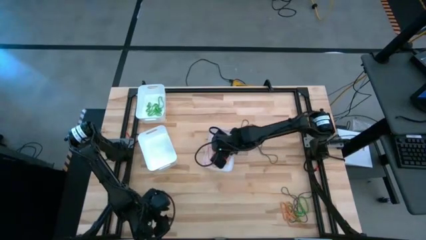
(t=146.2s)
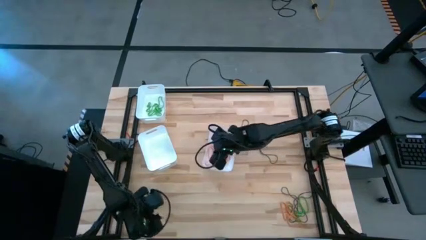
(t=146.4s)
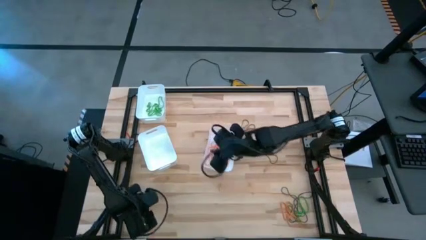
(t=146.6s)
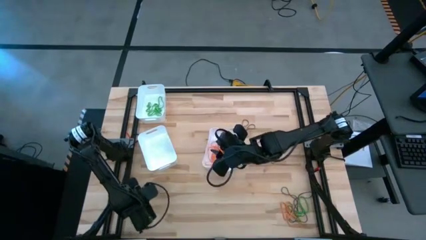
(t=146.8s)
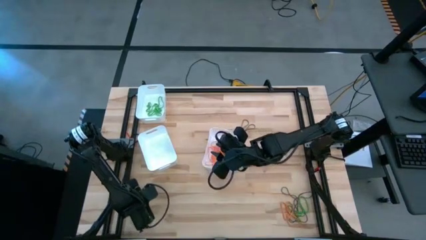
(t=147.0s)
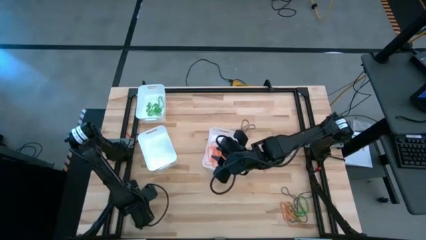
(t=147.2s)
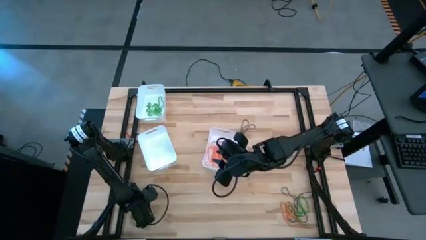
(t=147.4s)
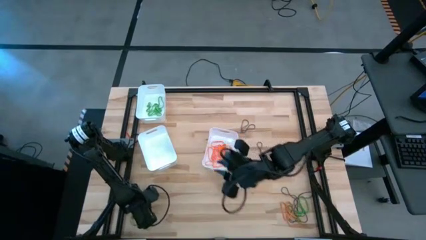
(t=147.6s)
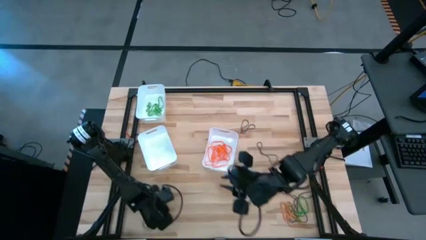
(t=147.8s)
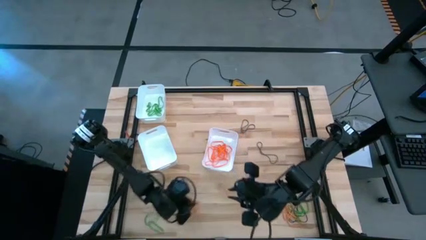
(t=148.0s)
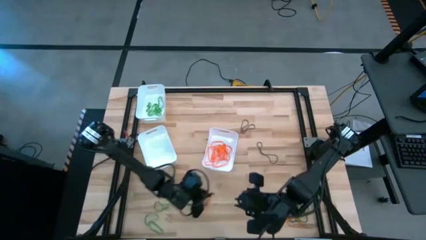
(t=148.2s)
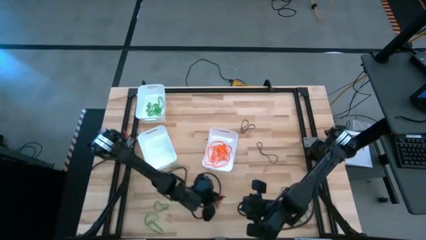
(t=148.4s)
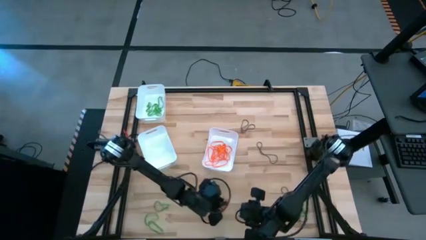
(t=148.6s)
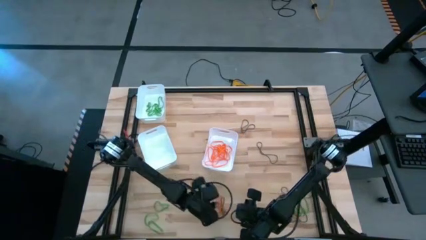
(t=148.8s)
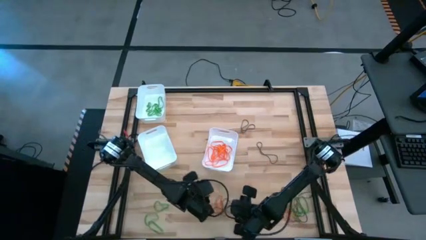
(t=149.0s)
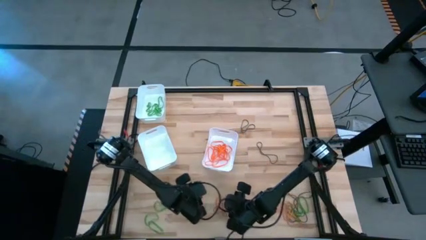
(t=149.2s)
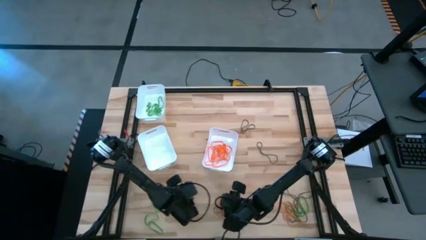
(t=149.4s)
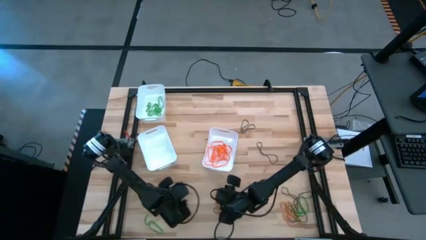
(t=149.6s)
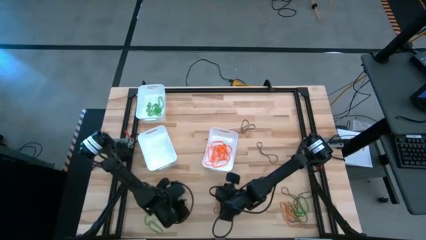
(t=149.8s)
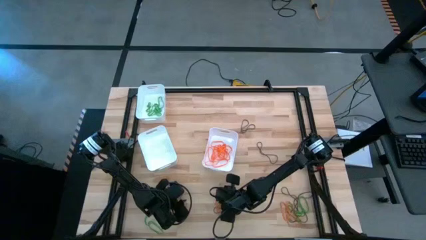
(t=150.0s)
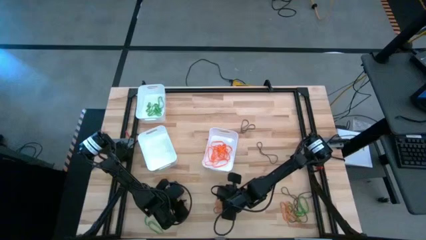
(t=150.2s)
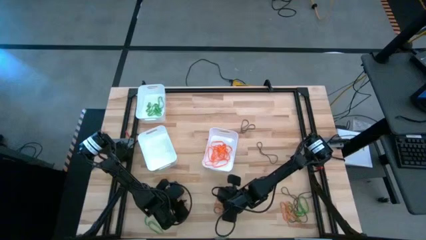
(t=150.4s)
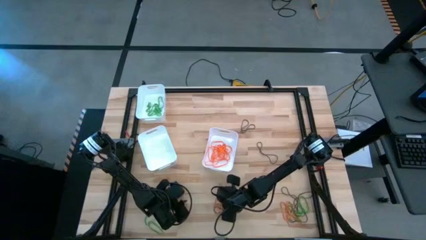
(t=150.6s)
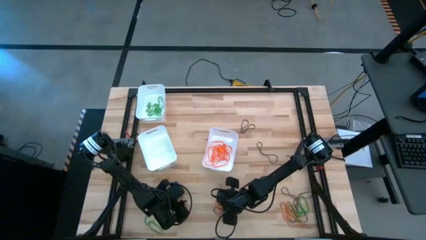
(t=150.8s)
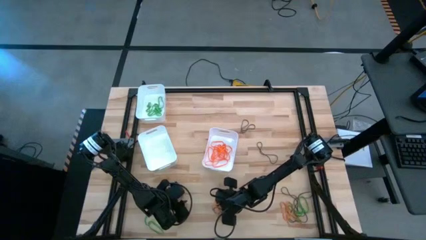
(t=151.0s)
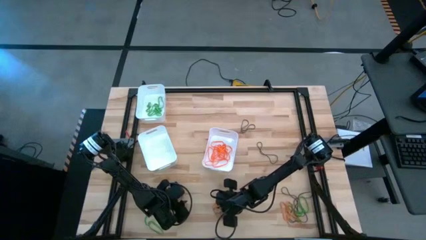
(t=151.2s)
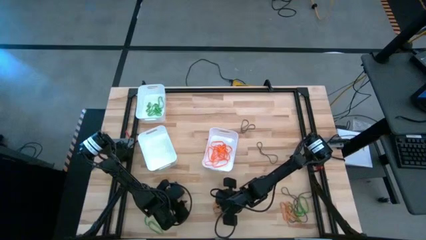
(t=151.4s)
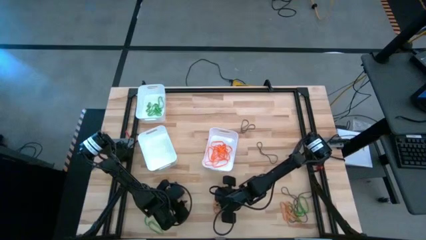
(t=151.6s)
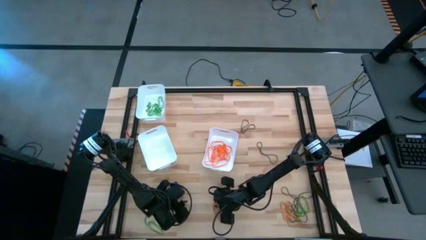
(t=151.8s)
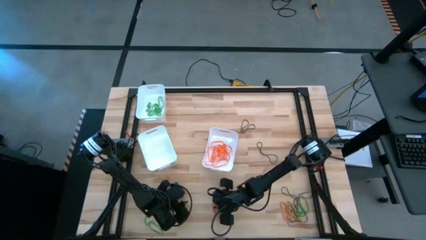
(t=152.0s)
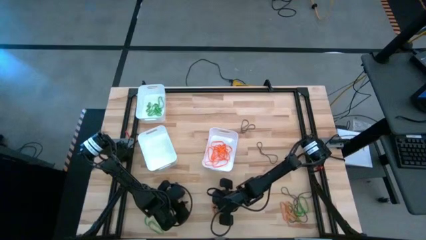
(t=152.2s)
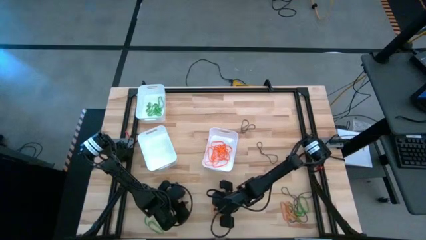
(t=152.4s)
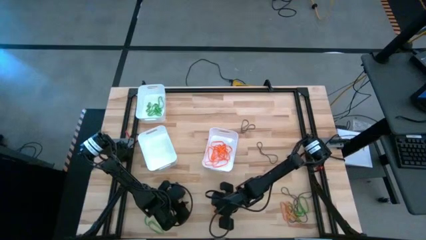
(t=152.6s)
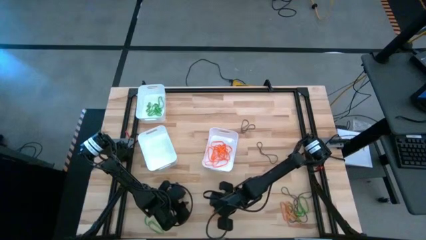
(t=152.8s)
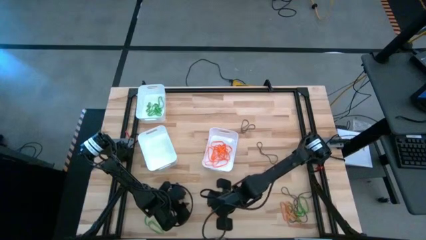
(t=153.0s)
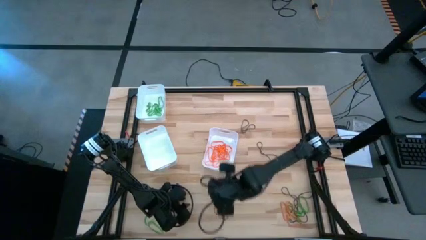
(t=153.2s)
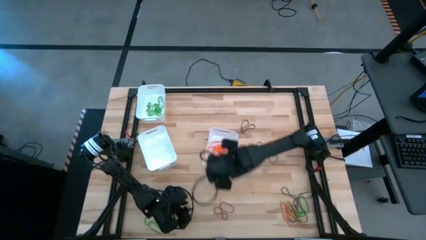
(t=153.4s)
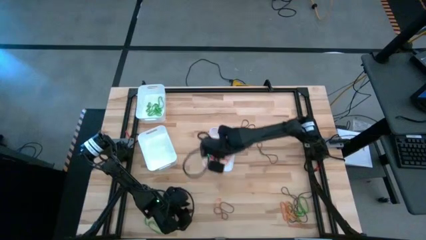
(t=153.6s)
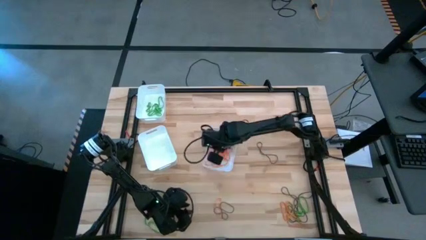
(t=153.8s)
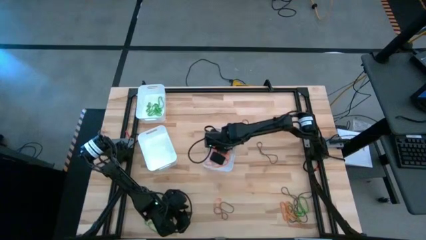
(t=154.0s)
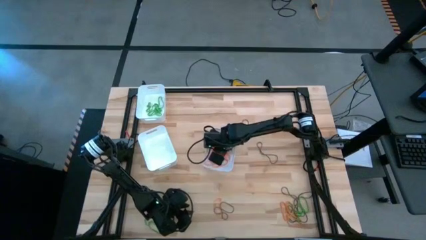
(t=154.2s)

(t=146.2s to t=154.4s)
Task: Sort rubber bands into baskets
Put the orange rubber band into the bottom right white bin

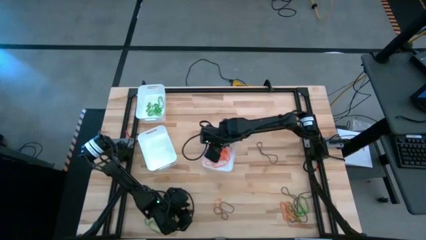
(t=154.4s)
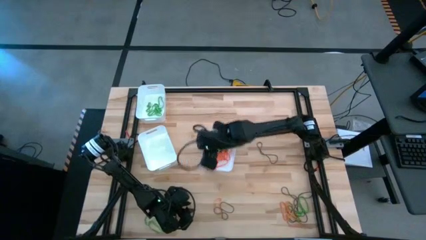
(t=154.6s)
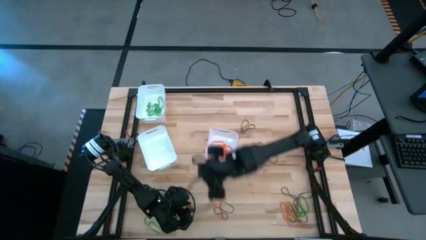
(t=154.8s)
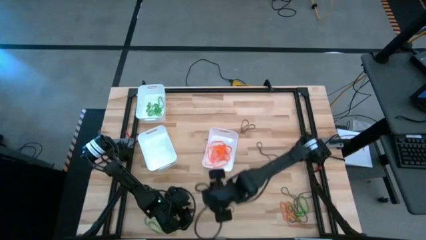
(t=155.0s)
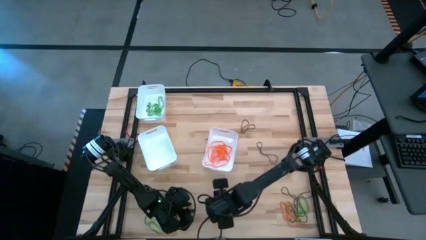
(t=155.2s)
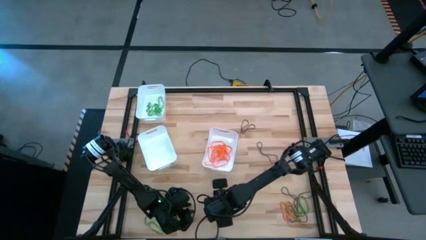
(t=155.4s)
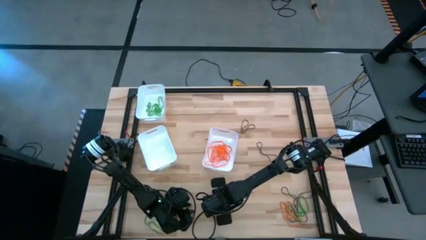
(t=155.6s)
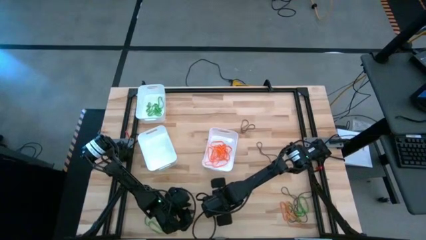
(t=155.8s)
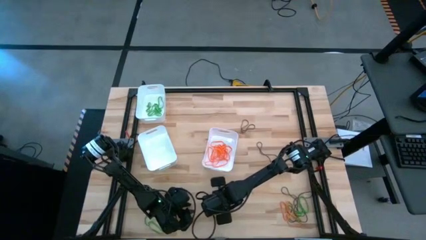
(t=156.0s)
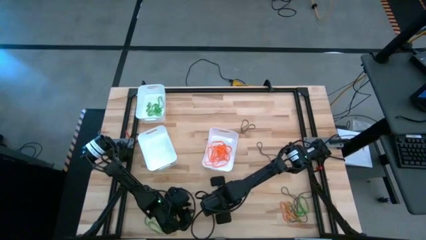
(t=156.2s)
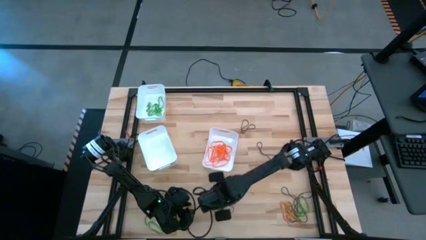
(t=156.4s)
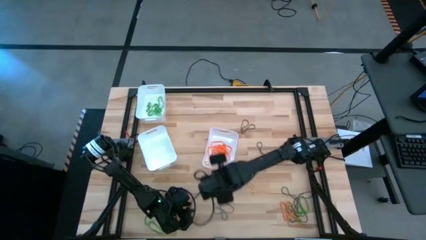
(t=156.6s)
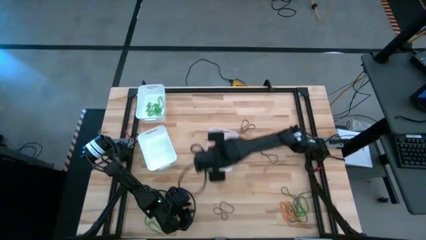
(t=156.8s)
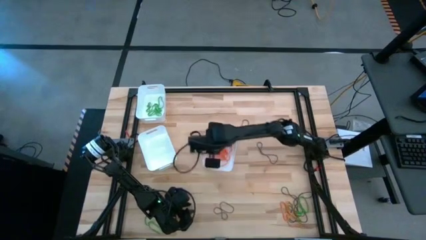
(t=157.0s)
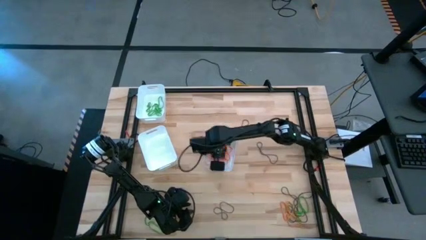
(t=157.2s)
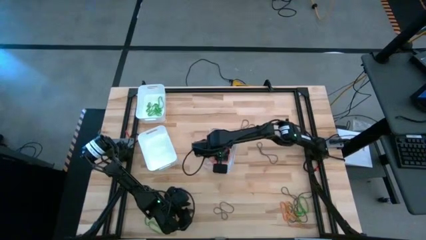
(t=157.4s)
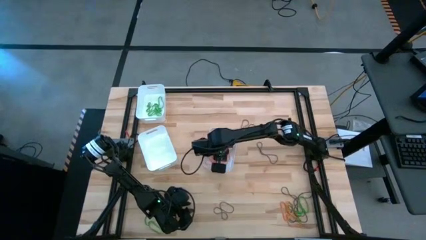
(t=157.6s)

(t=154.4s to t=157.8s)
Put the orange rubber band into the bottom right white bin

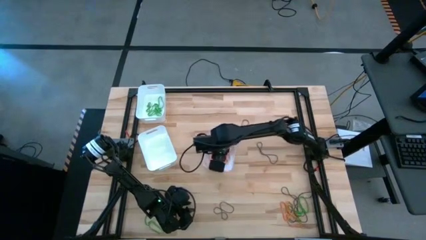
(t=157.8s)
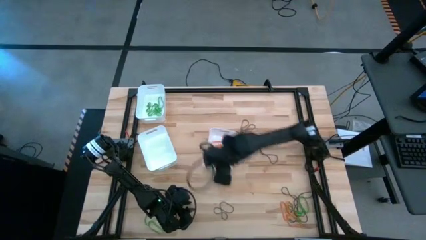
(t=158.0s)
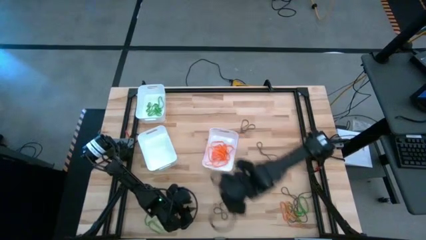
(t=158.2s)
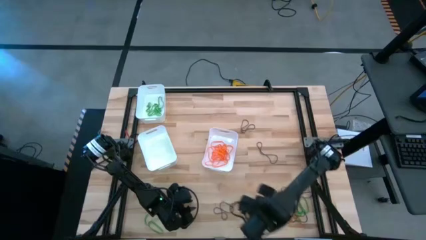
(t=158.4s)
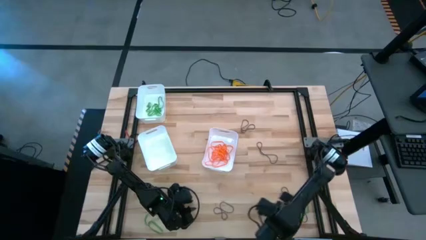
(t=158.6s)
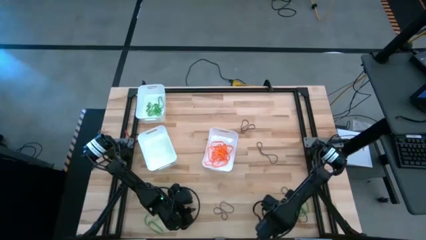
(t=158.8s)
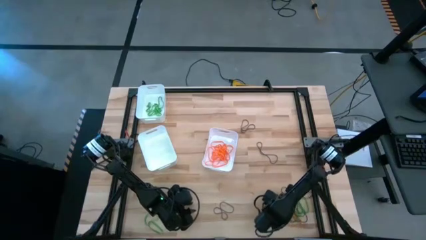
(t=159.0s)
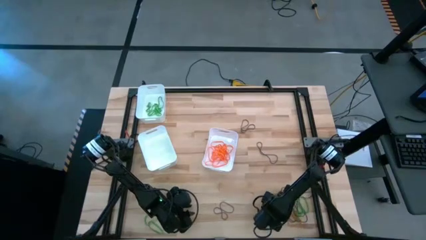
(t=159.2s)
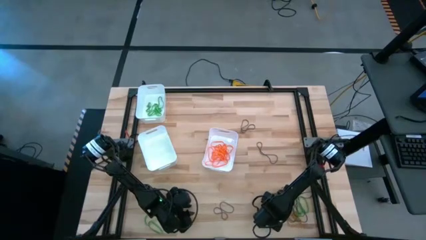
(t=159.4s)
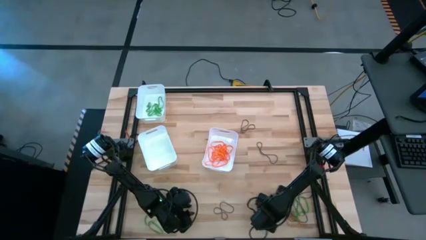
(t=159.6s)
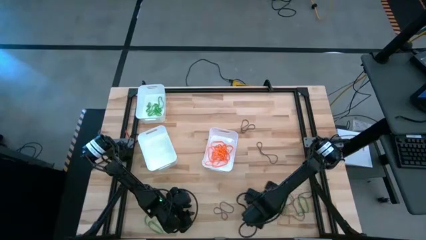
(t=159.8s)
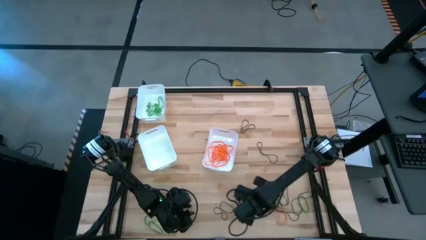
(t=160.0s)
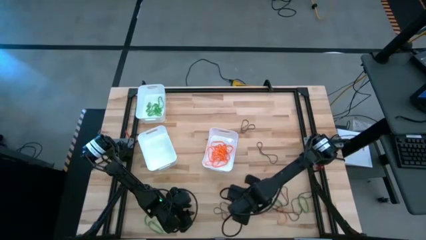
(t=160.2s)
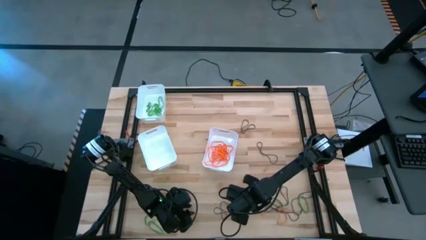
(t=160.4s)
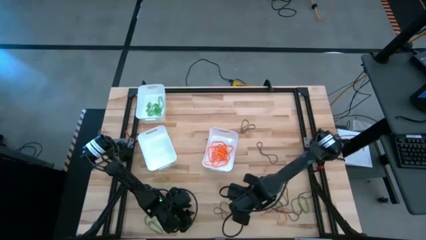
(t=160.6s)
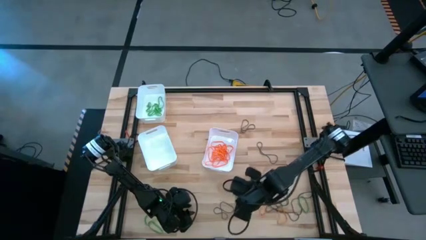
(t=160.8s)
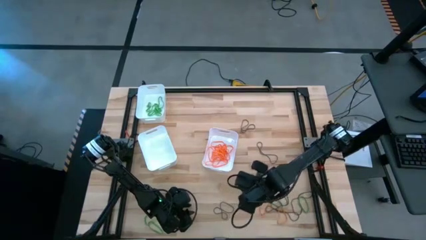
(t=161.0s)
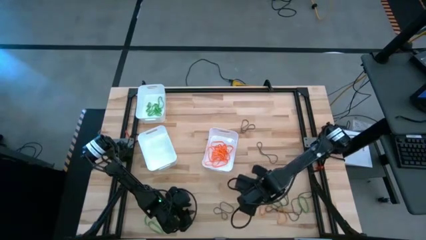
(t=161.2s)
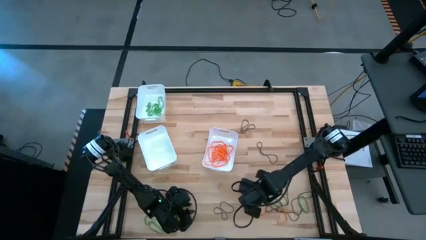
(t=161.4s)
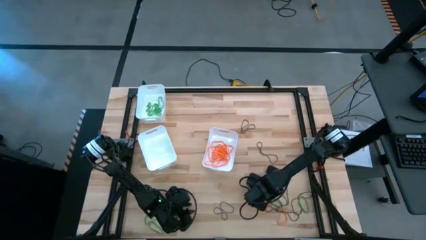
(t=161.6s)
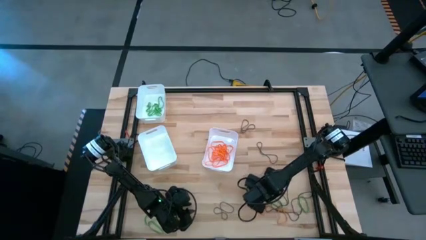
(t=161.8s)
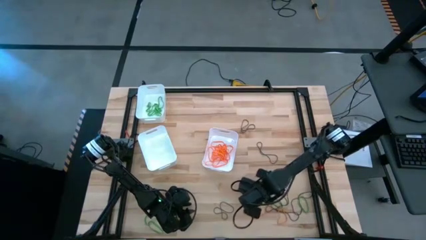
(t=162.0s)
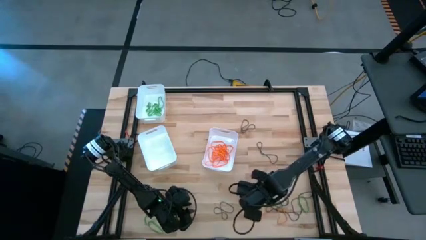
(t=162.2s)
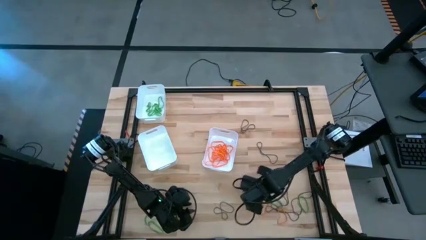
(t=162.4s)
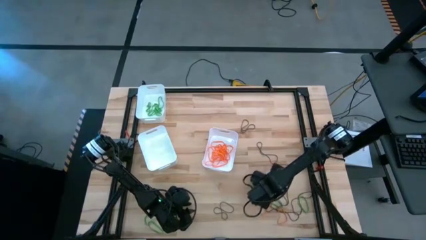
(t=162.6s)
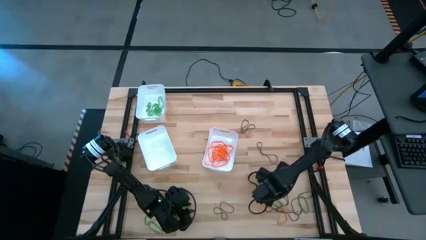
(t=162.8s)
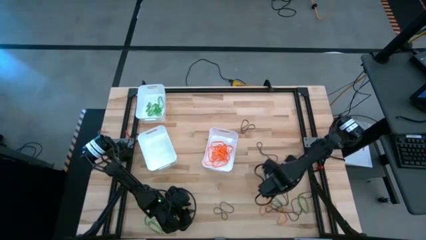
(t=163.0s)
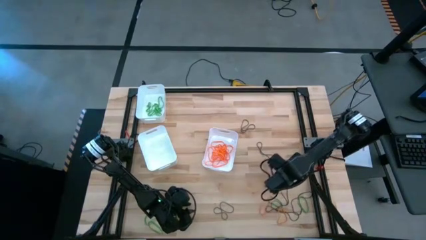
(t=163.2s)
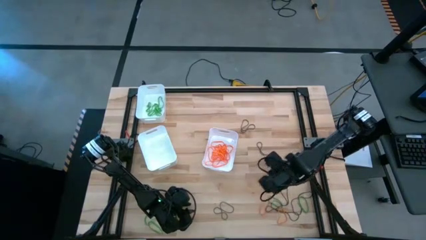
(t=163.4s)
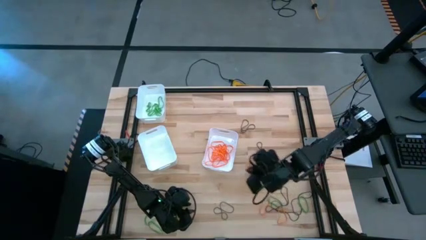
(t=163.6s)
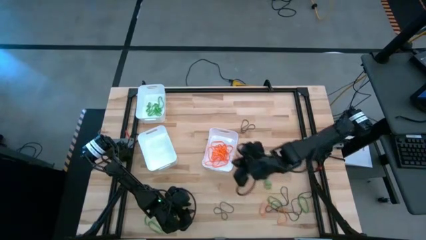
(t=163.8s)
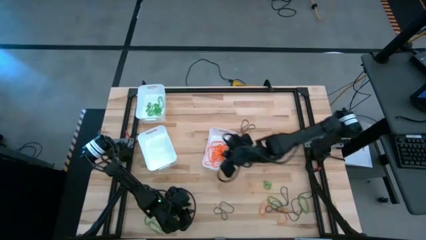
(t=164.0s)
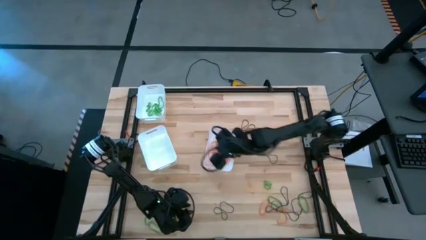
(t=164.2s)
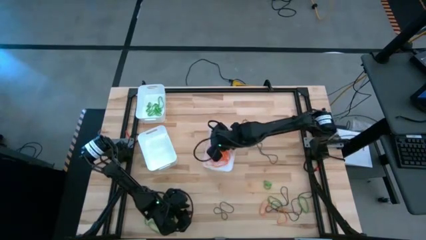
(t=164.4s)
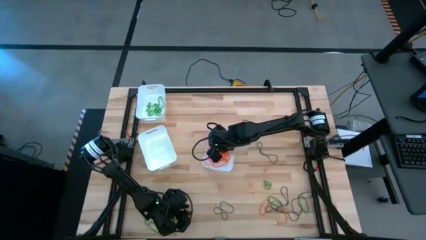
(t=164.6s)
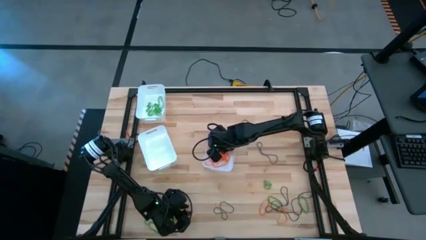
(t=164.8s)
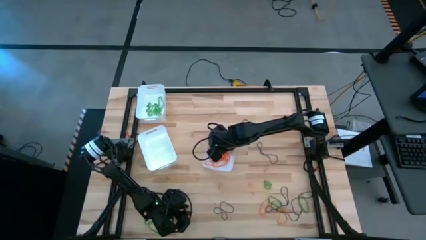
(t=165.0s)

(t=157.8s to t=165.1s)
Put the orange rubber band into the bottom right white bin
